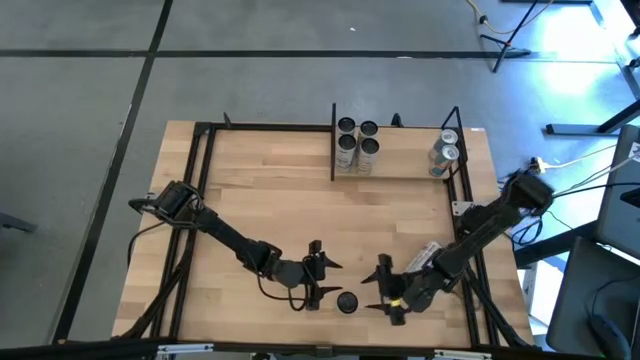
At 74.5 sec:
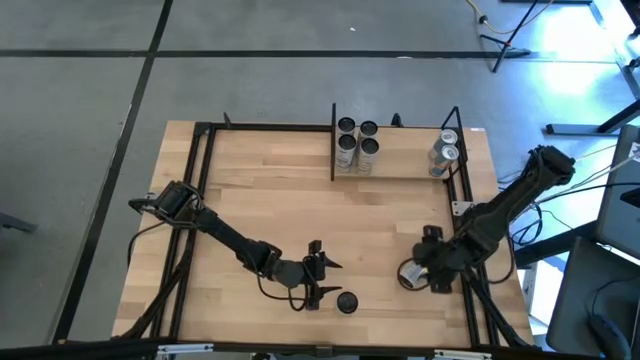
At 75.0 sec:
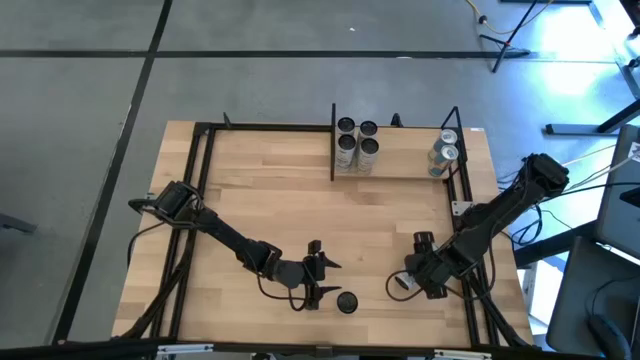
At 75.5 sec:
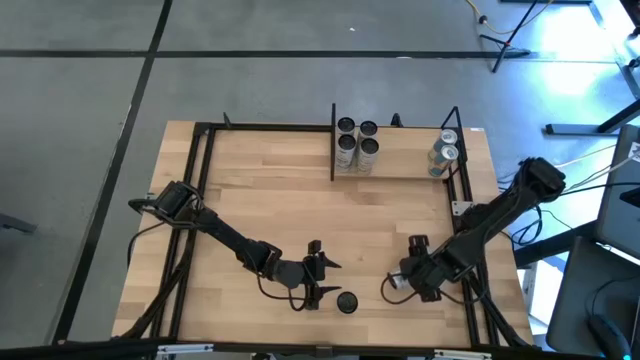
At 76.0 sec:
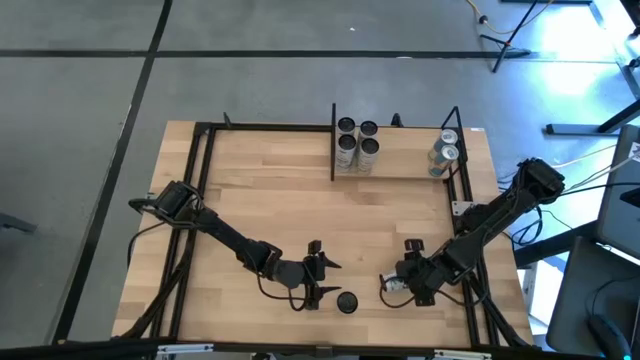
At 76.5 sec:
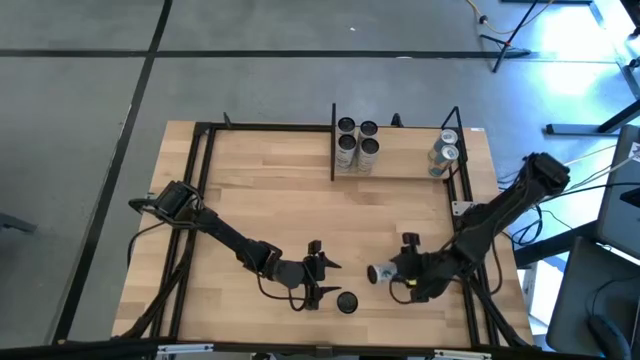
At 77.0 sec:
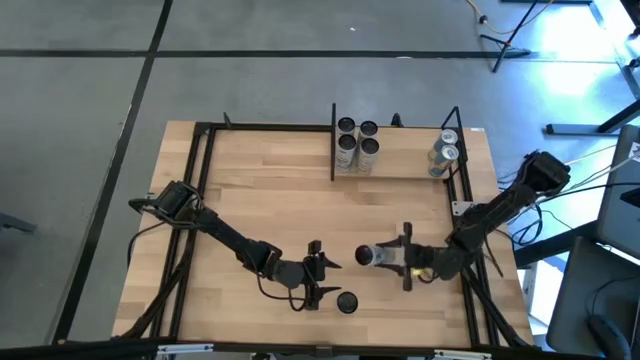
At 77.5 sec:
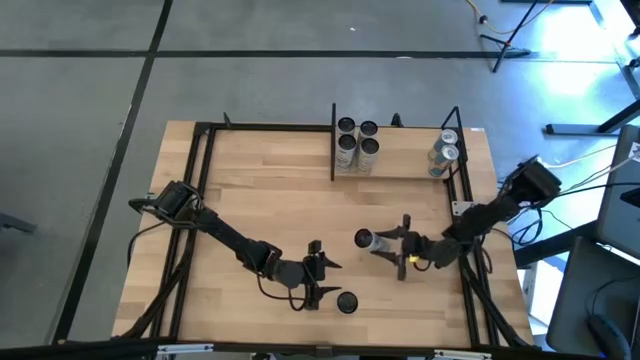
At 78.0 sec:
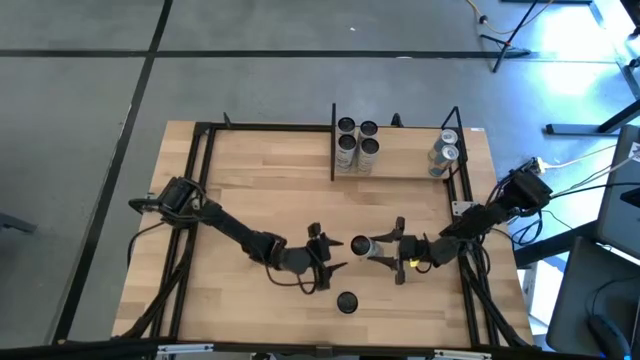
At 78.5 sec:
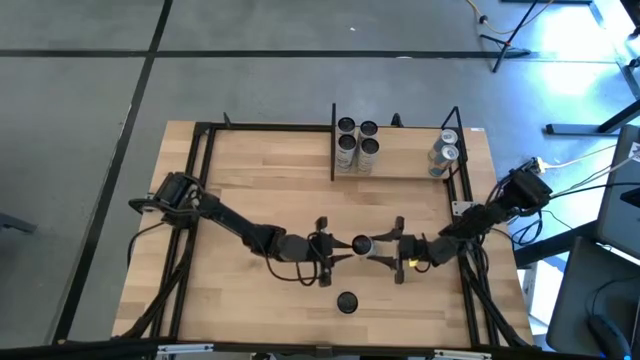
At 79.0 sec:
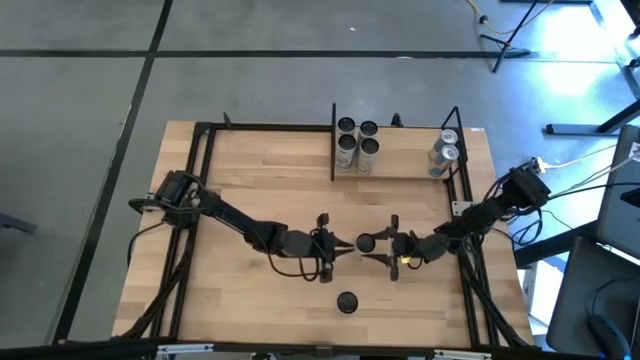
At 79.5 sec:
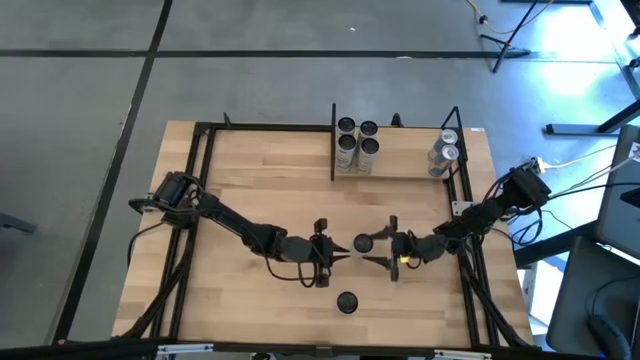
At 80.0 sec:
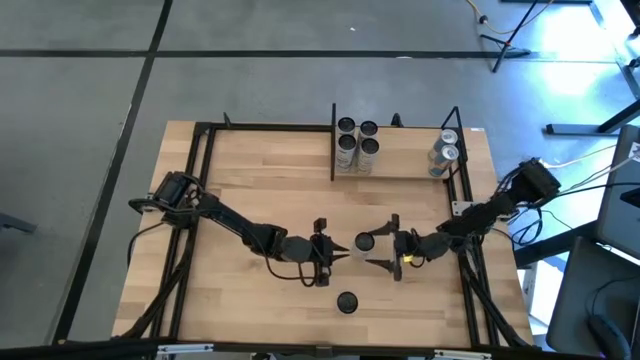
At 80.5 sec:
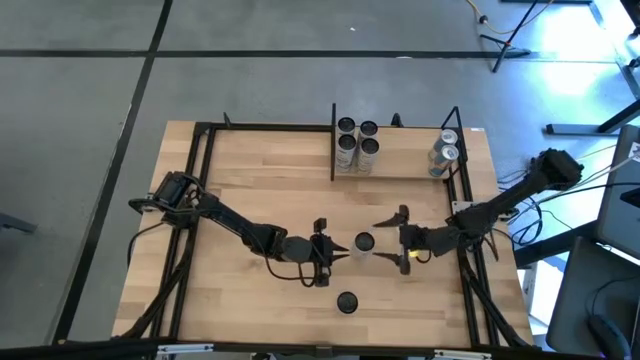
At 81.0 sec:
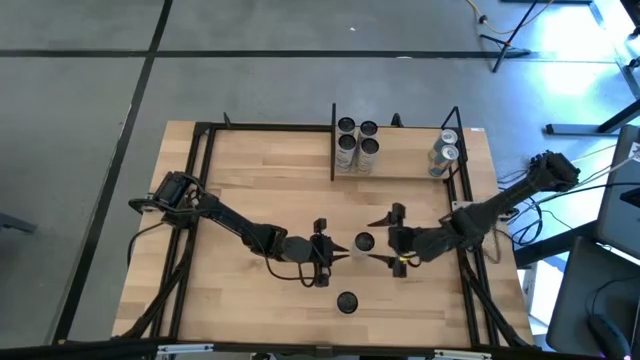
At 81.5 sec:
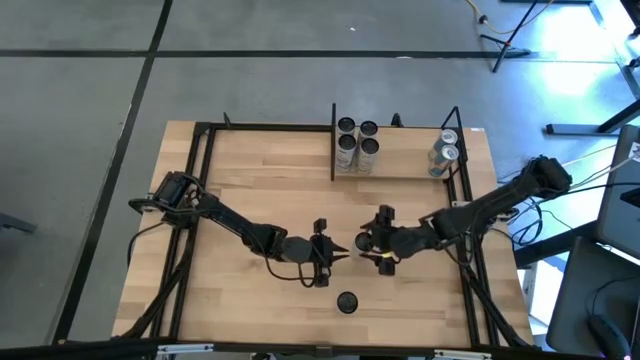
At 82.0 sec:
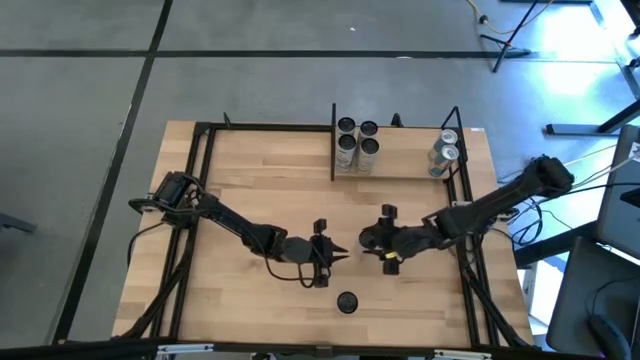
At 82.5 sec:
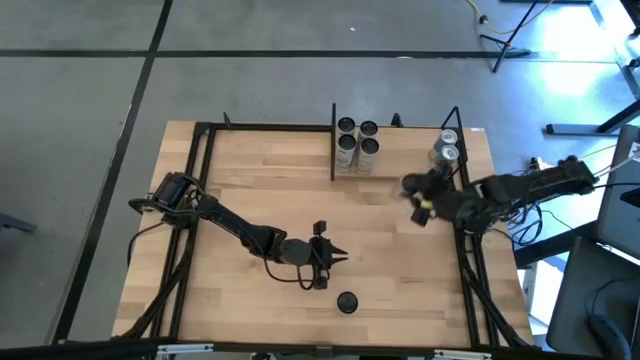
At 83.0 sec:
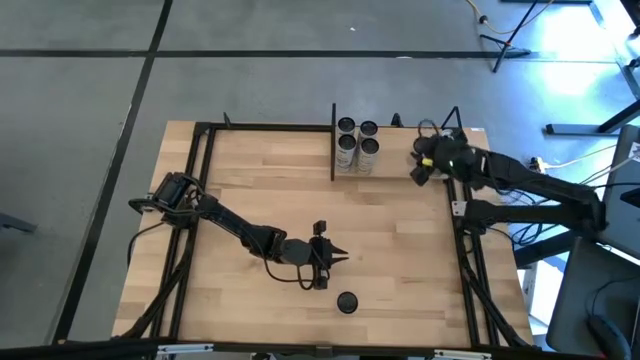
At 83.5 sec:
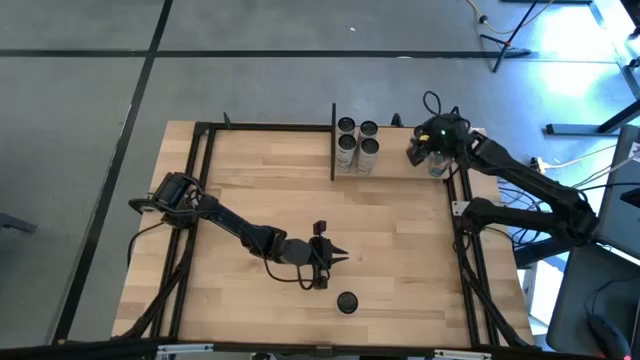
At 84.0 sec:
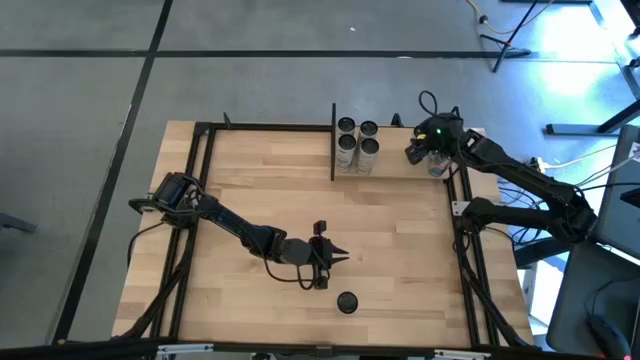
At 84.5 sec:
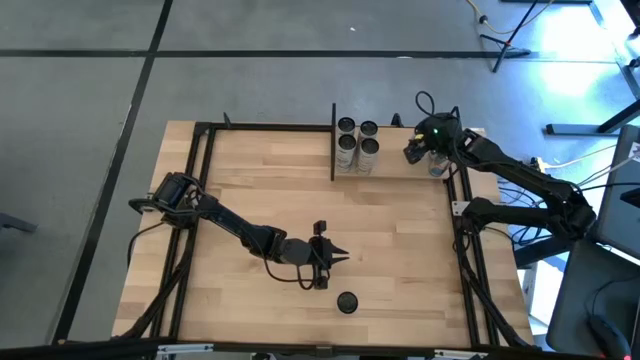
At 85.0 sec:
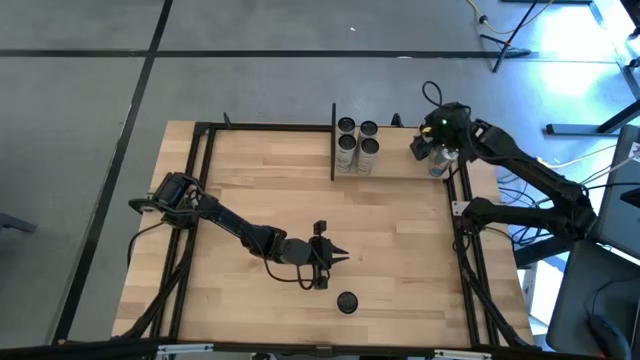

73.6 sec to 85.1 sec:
Task: Place canned beverage on shelf
Put the right white-pink soda can on the shelf

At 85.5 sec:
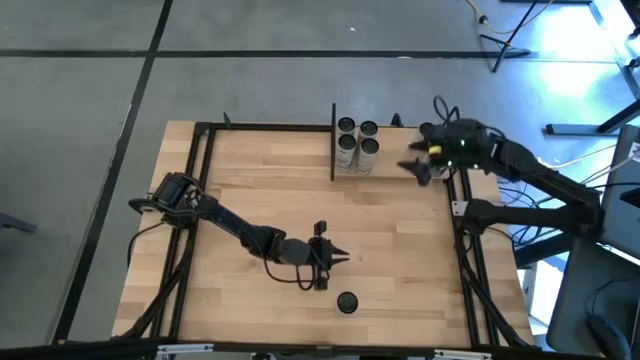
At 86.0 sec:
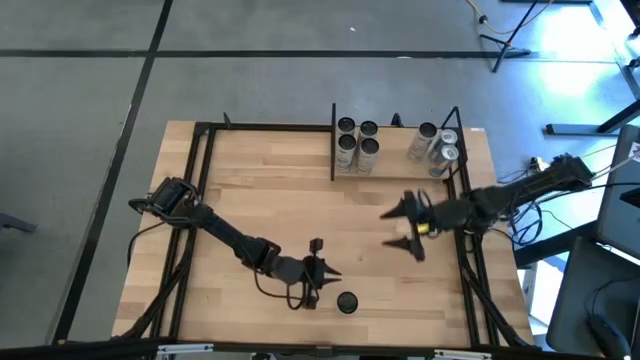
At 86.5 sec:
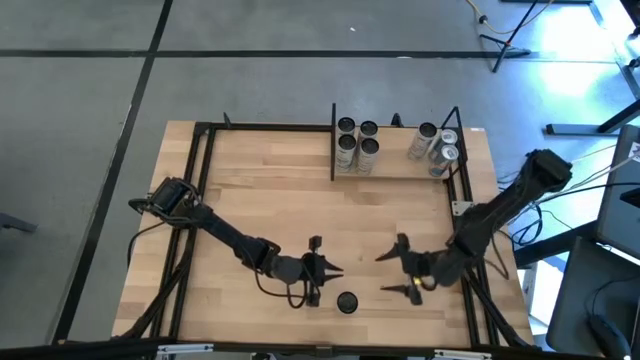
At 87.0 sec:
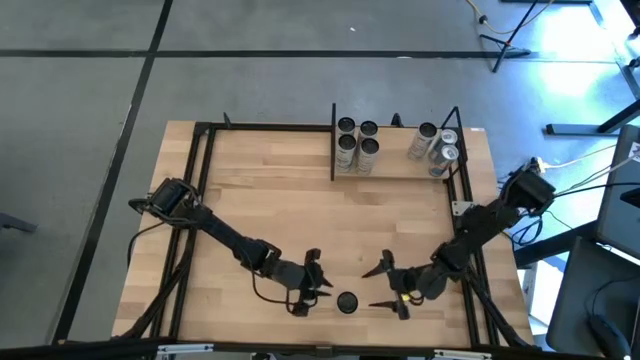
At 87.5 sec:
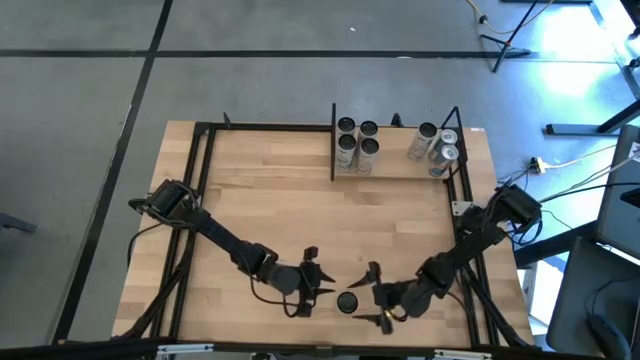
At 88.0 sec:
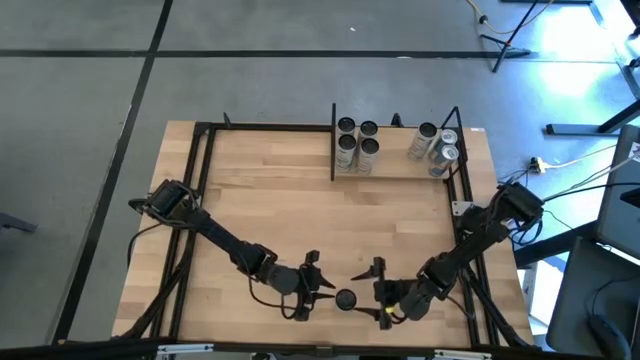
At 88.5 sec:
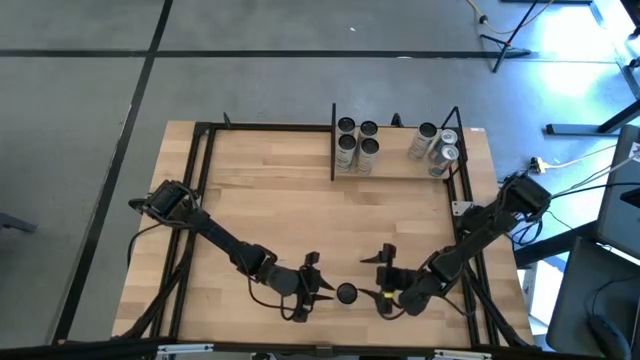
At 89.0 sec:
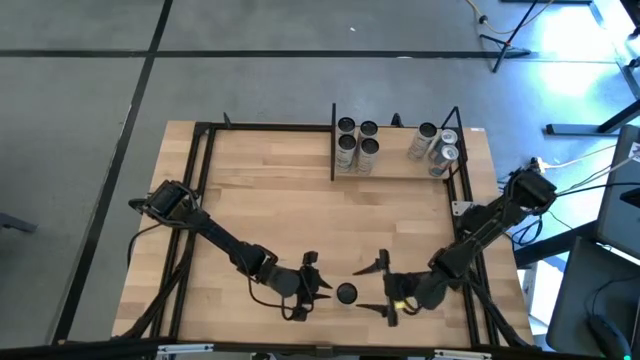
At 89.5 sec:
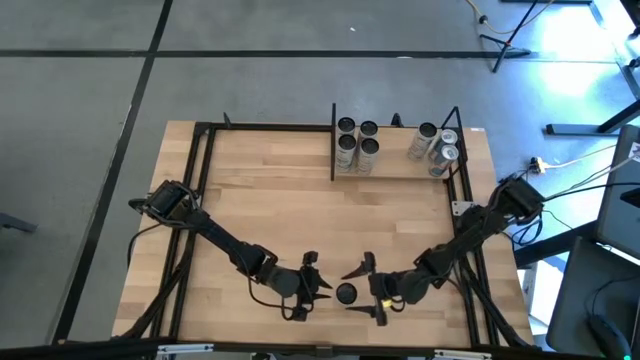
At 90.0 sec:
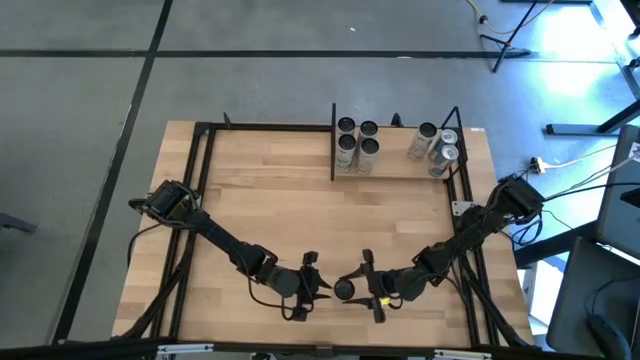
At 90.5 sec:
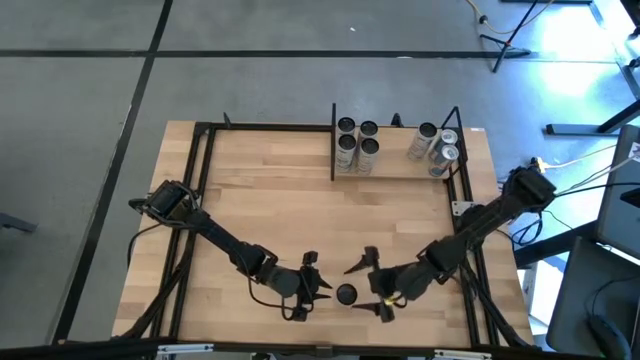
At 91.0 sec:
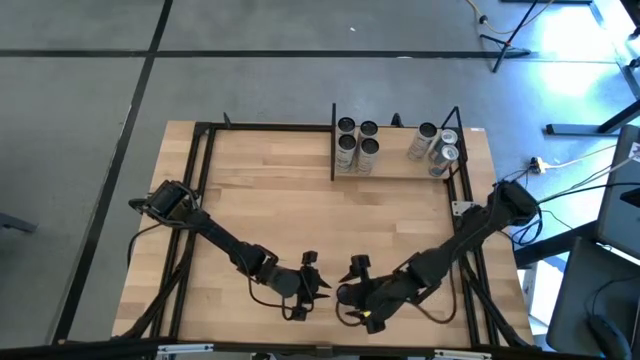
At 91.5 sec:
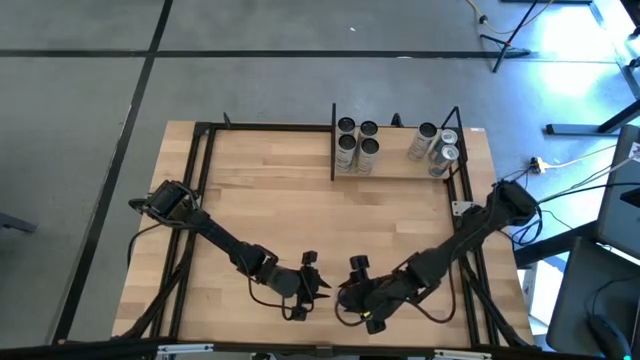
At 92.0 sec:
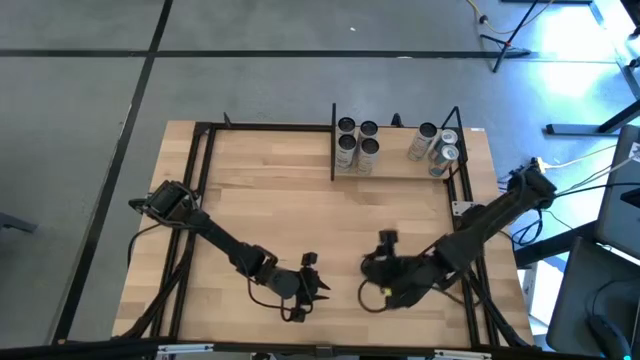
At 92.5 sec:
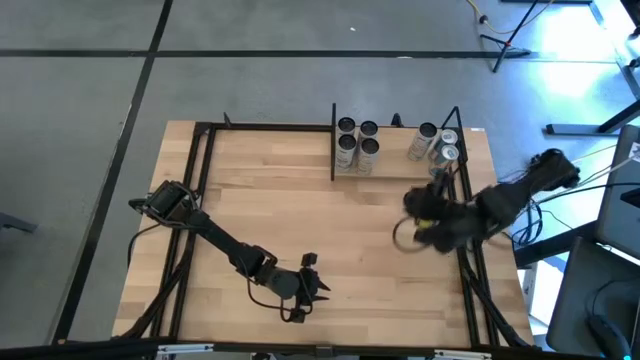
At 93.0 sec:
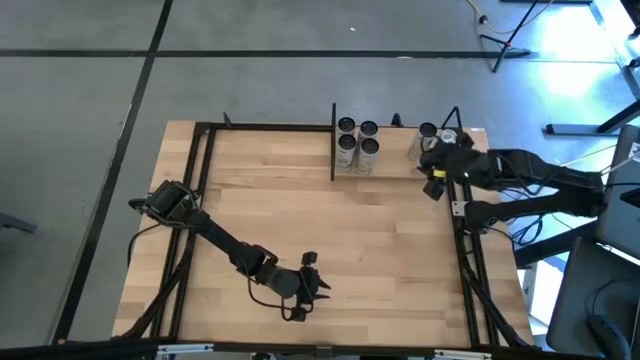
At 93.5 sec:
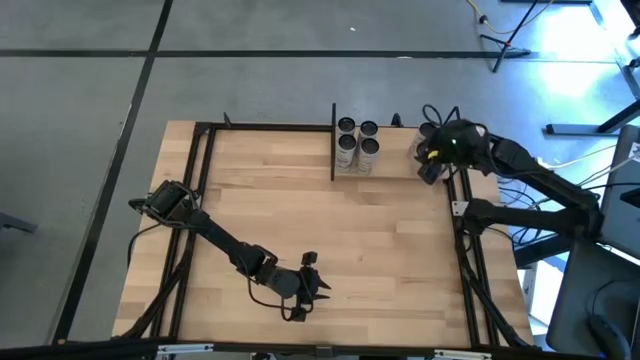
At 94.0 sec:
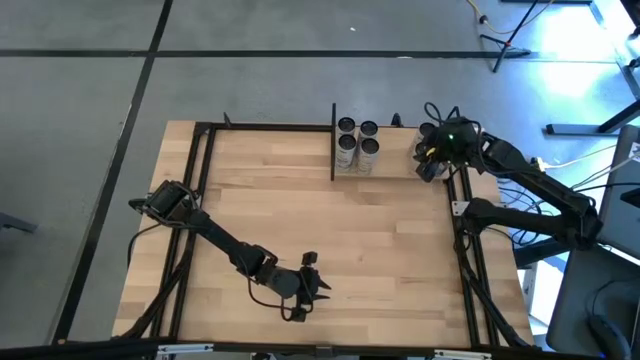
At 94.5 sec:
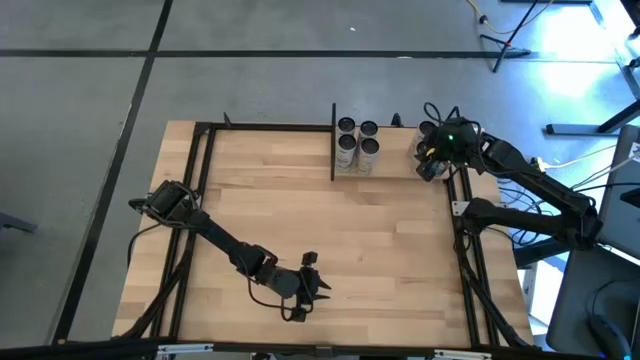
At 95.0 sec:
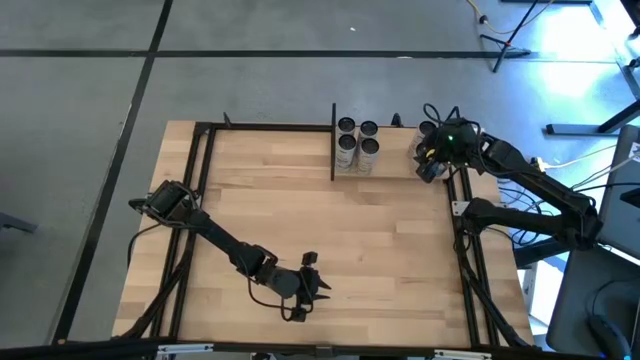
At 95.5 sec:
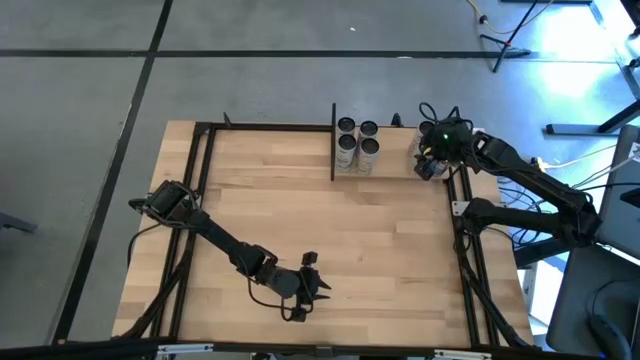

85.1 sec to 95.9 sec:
Put the white-pink soda can aligned with the other white-pink soda can on the shelf
